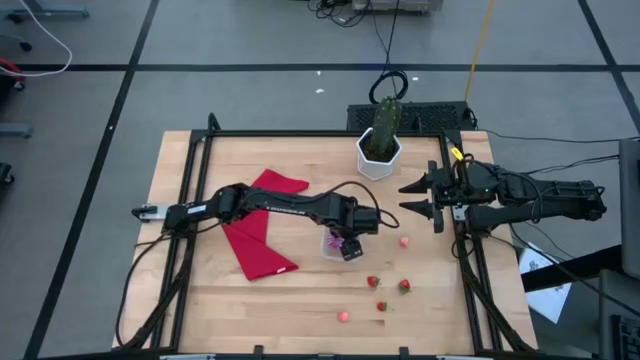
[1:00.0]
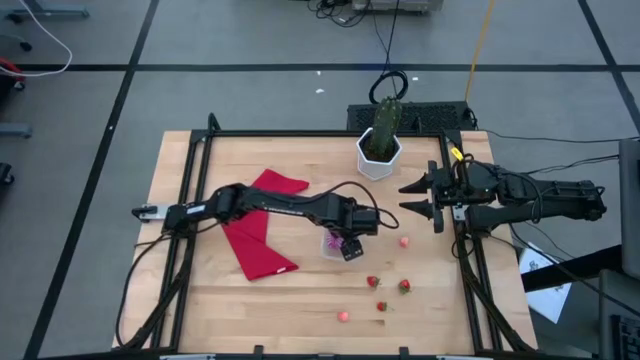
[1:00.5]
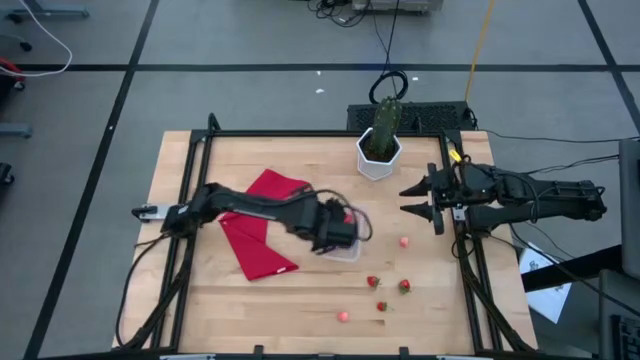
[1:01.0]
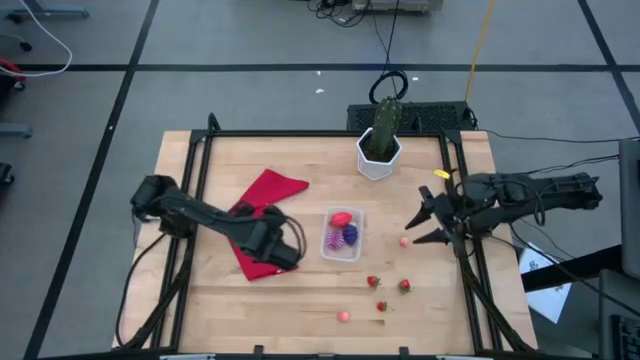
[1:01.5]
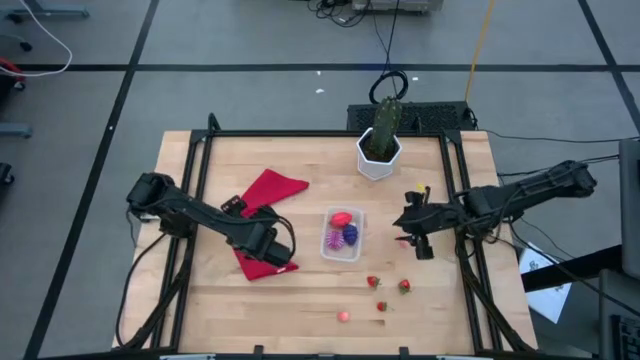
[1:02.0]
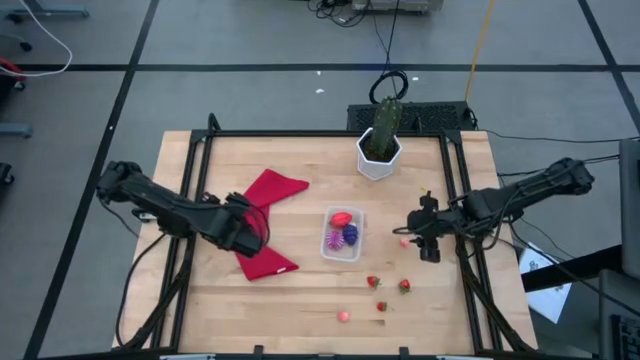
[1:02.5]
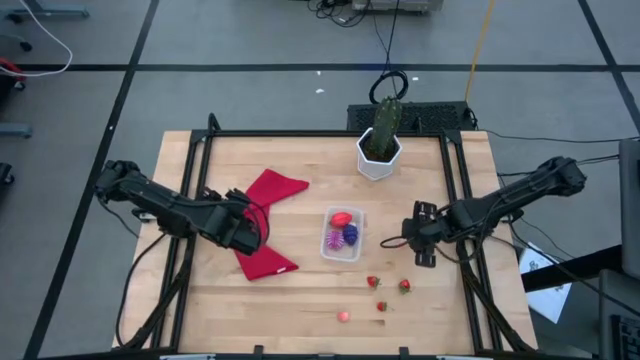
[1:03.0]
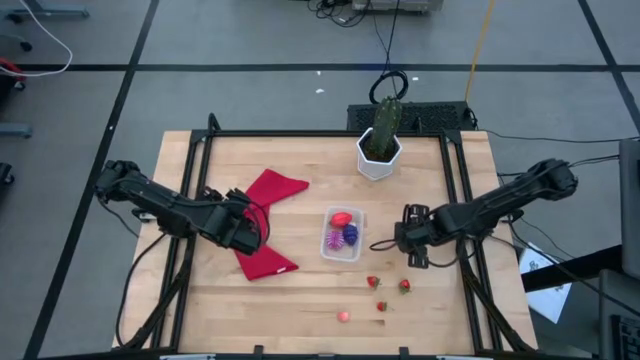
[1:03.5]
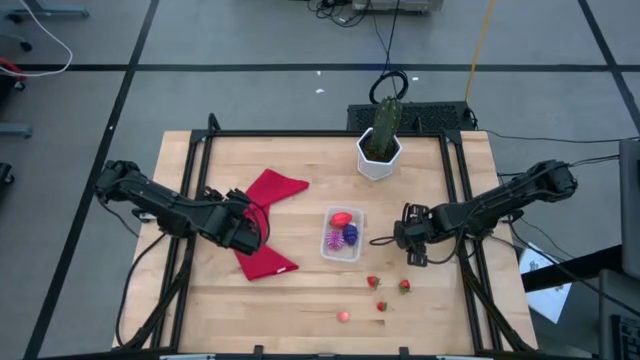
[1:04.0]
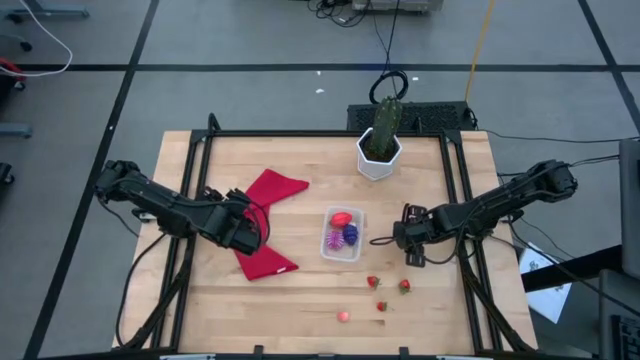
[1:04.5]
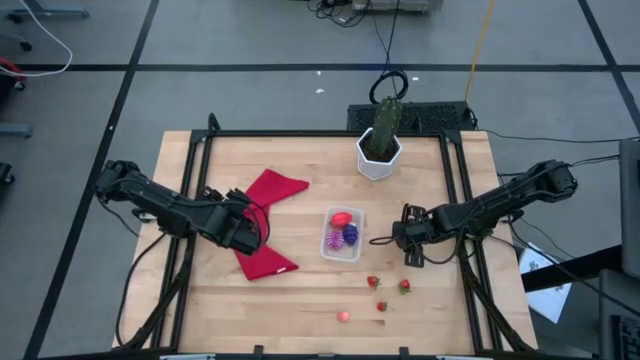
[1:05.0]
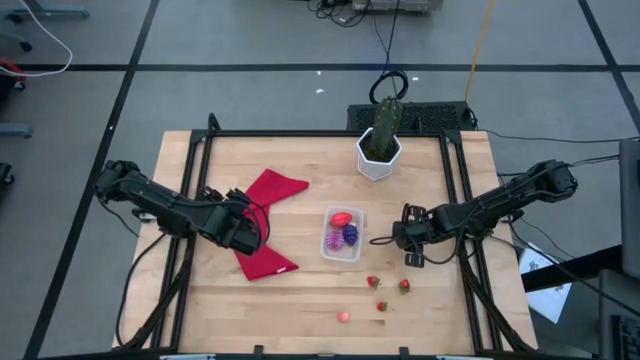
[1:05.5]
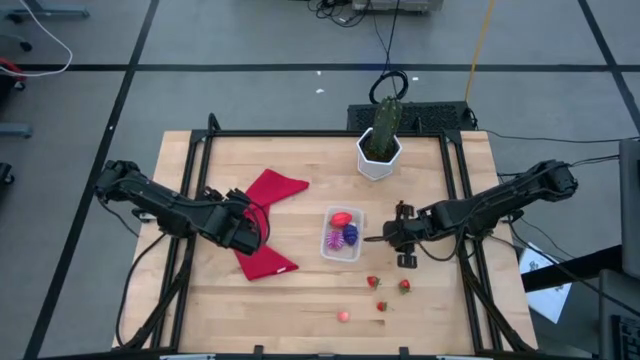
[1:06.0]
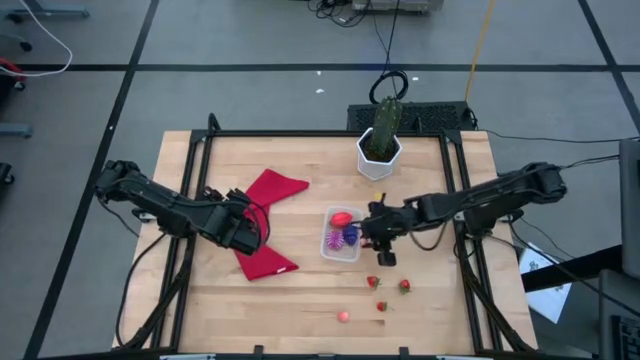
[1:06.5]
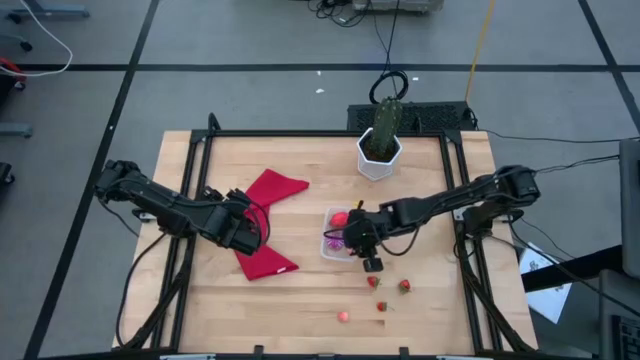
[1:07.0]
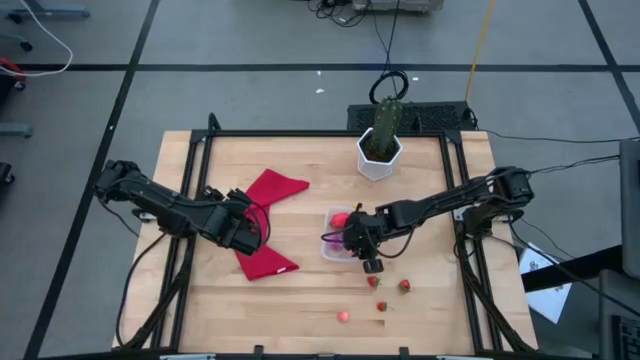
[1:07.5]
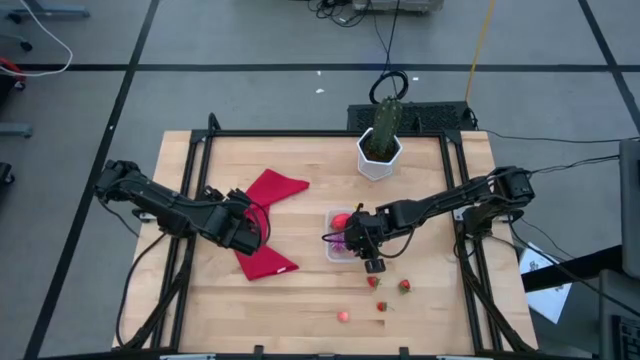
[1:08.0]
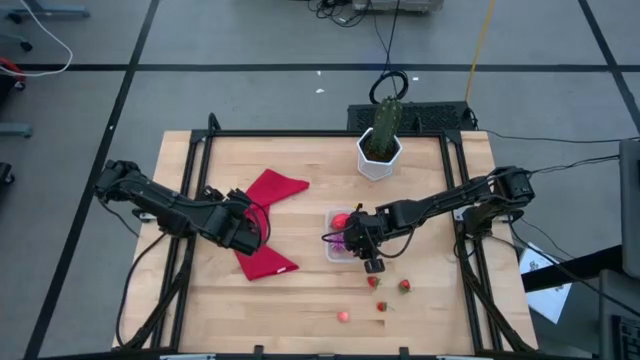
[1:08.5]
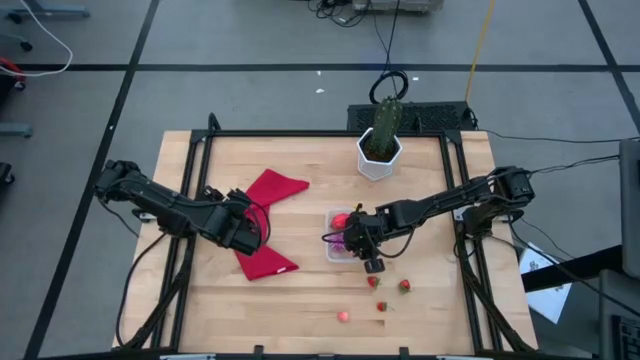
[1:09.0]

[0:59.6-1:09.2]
Task: Pick and placing Produce into tupperware
Put the top pink peach into the transparent bin

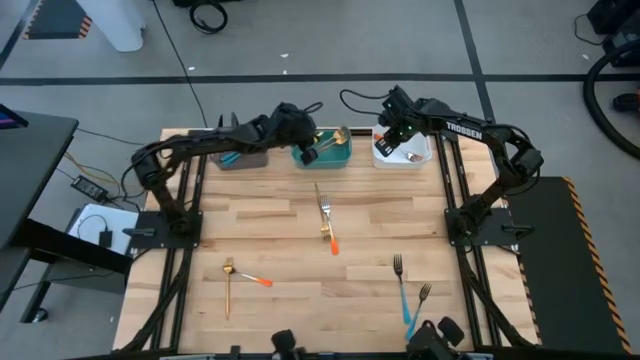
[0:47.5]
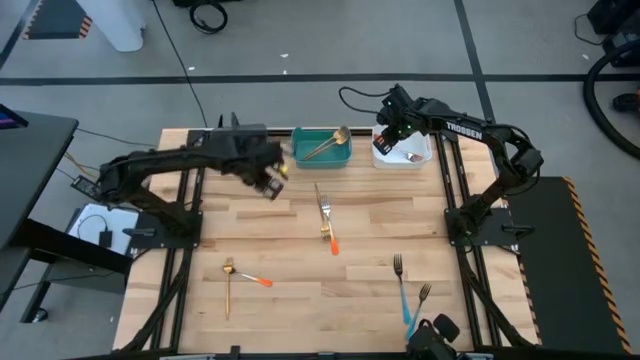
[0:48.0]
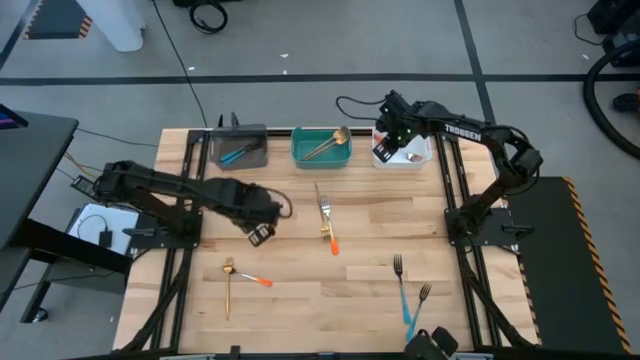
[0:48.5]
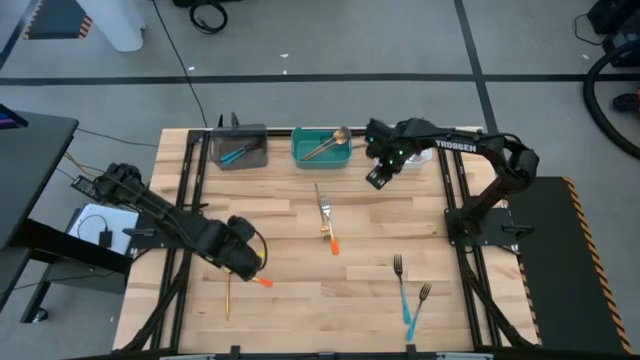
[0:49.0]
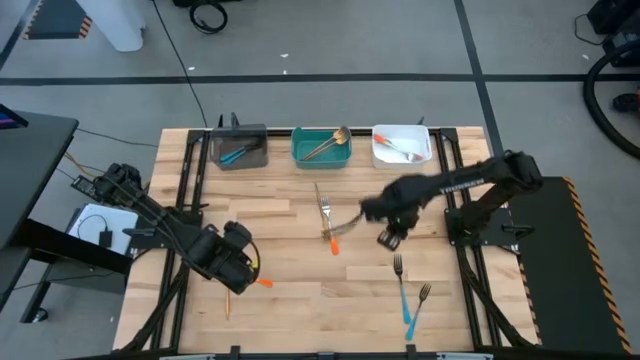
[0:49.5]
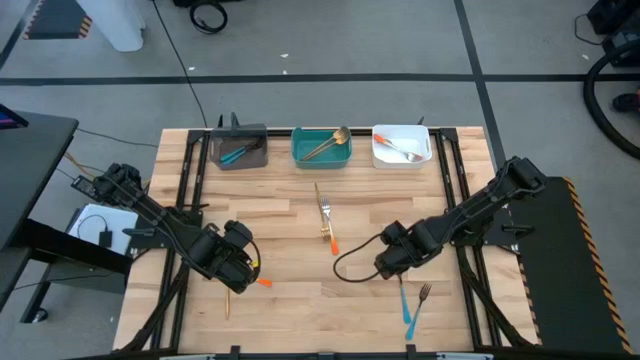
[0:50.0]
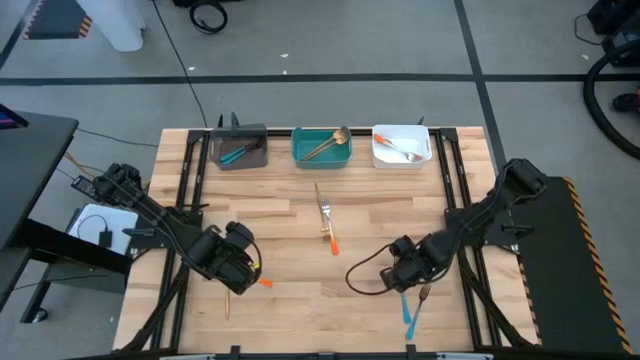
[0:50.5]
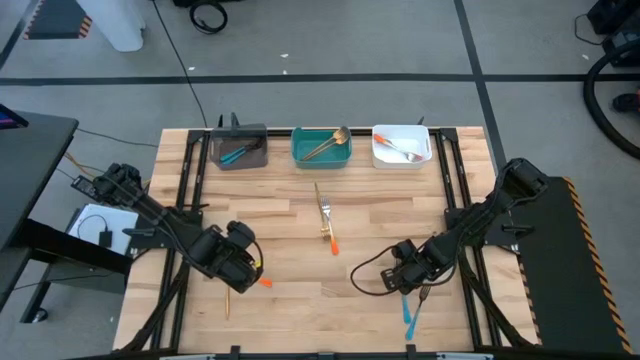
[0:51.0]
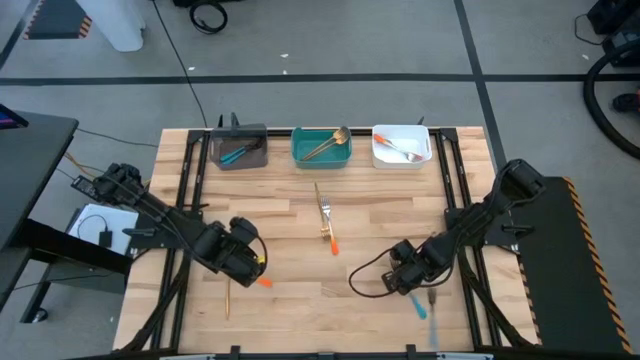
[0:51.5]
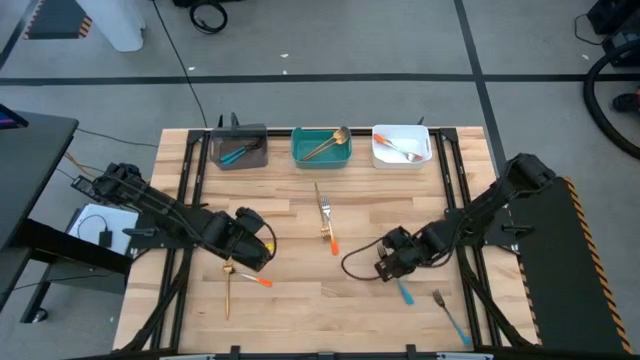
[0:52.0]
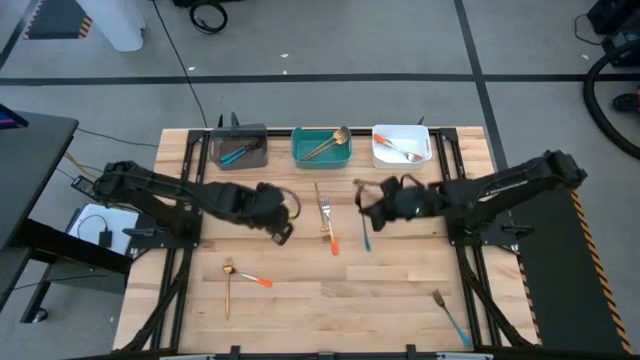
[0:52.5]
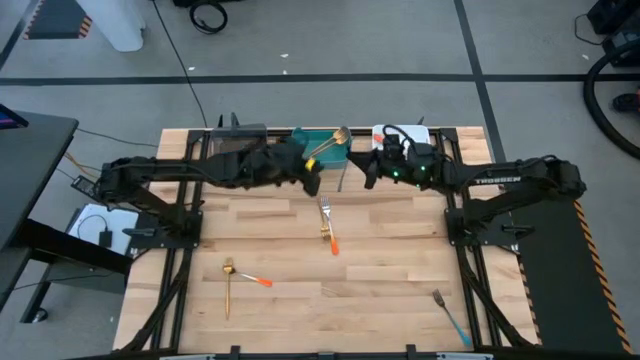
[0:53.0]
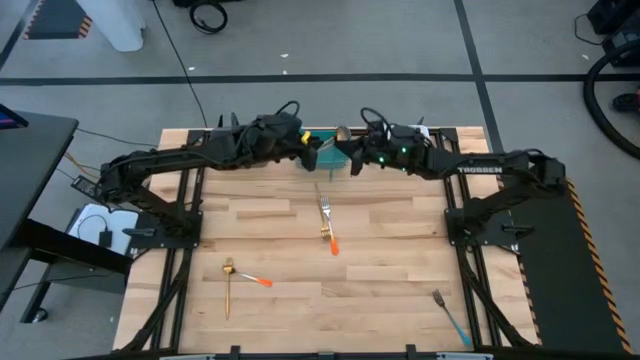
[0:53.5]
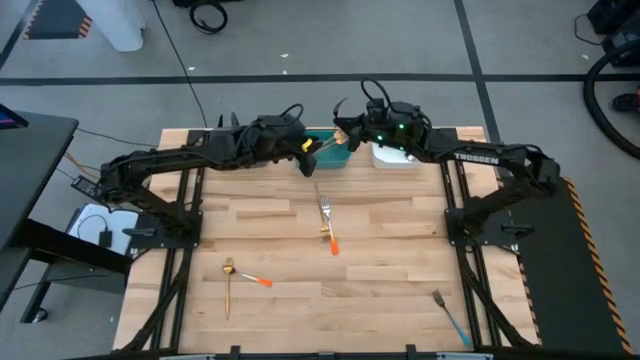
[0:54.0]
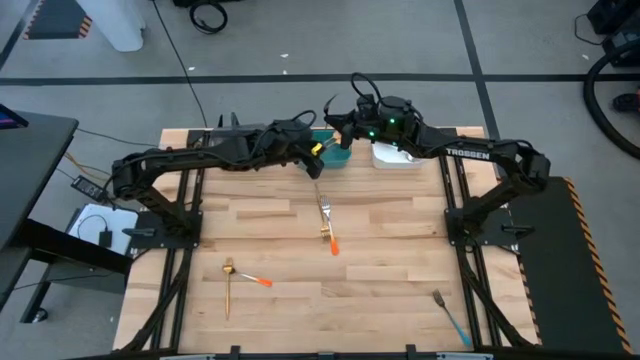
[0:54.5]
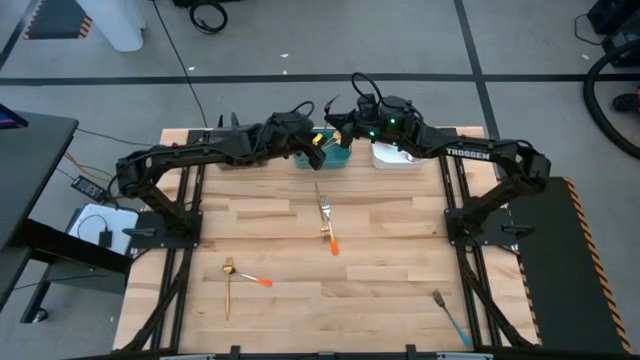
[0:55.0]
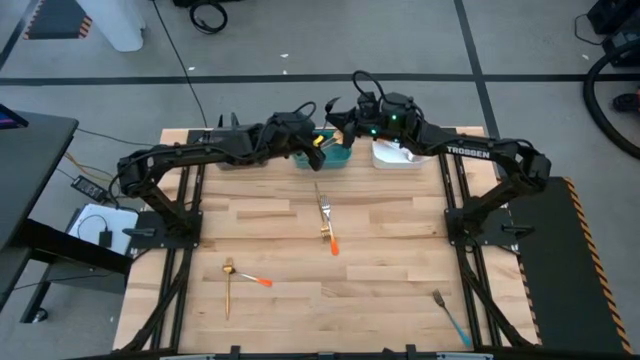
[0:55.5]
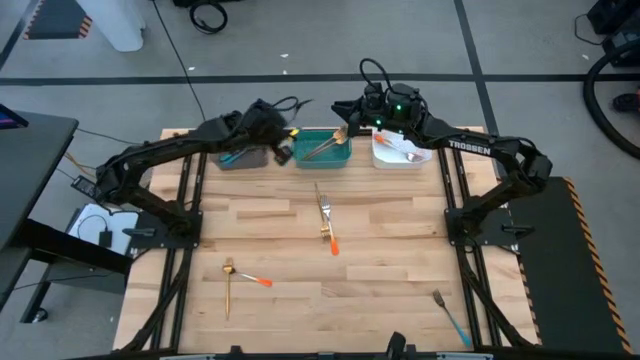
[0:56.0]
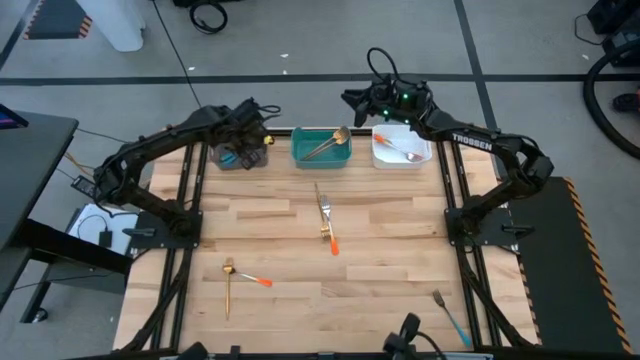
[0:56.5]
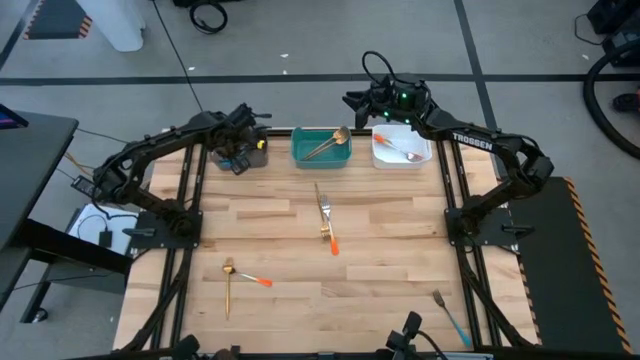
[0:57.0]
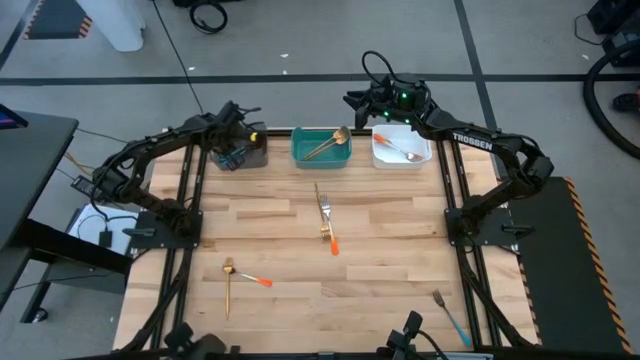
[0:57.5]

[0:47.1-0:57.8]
Task: Sort silverware by color (type)
Put the blue fork into the black bin
